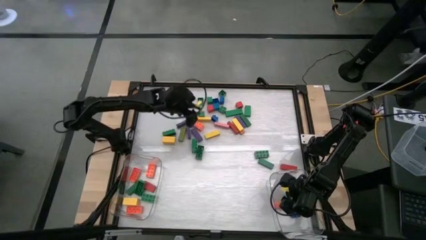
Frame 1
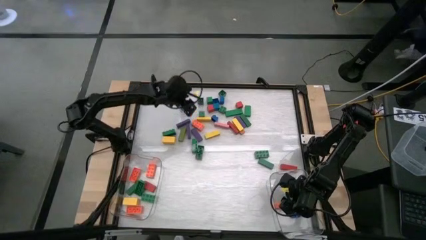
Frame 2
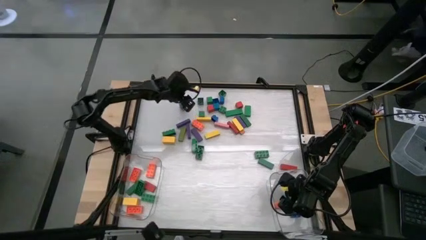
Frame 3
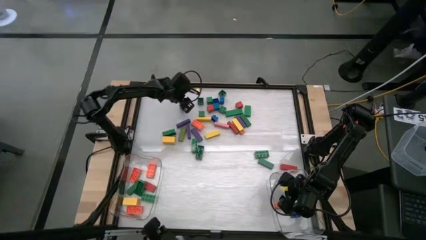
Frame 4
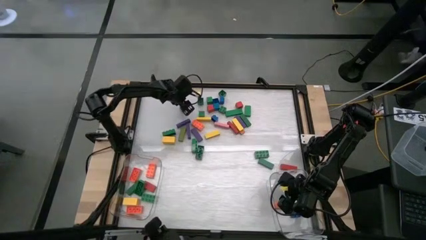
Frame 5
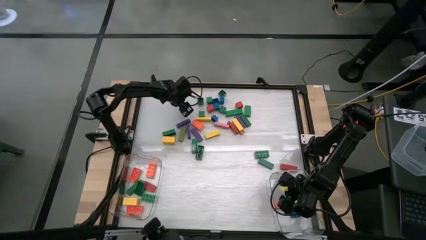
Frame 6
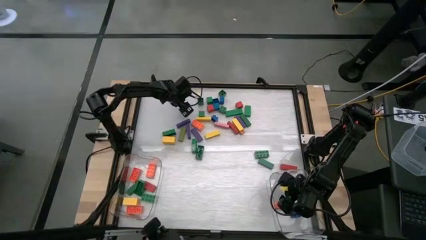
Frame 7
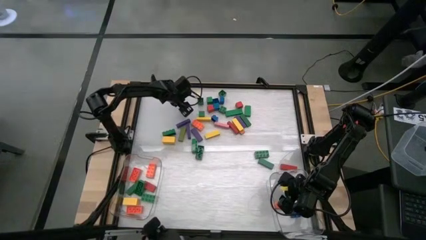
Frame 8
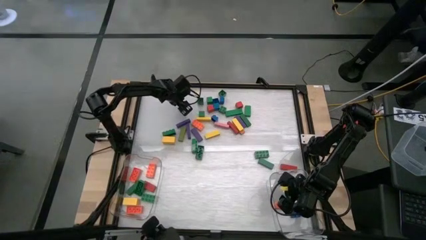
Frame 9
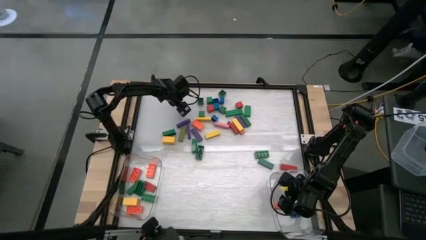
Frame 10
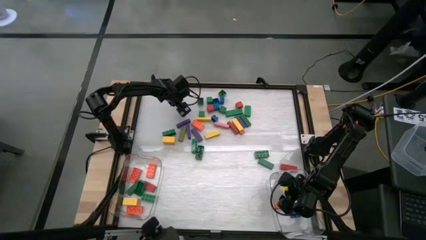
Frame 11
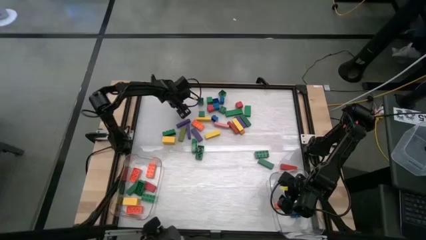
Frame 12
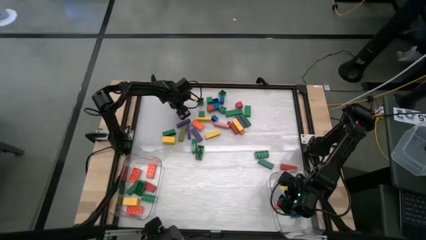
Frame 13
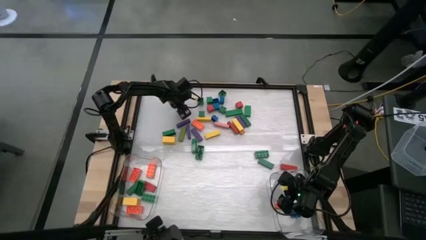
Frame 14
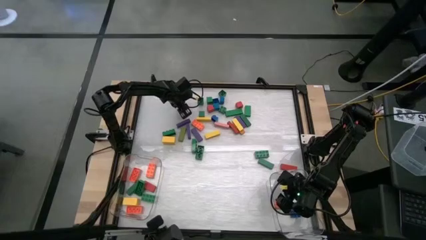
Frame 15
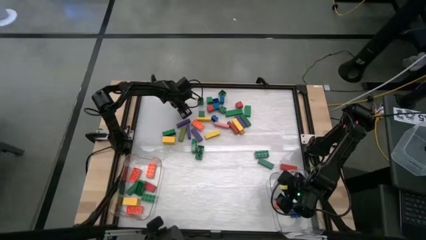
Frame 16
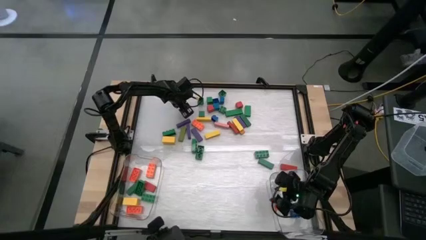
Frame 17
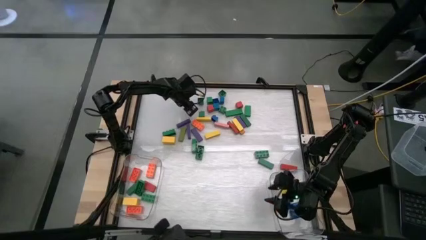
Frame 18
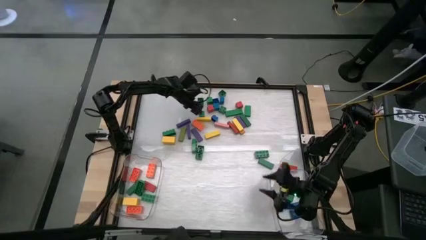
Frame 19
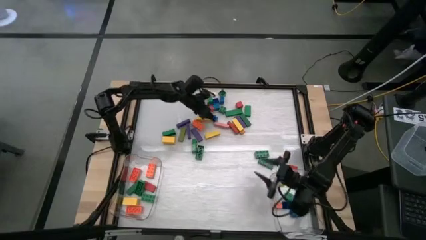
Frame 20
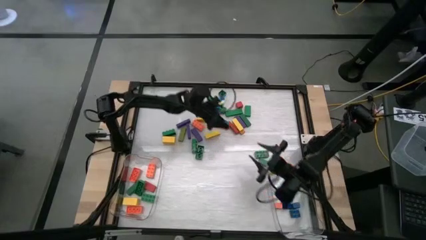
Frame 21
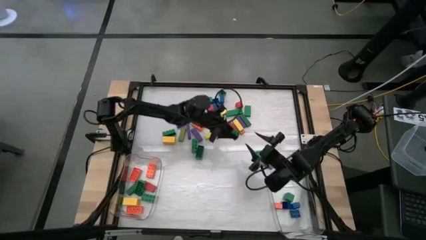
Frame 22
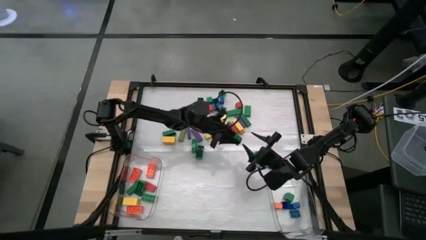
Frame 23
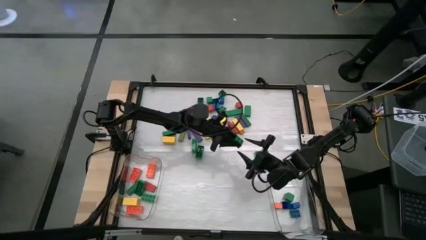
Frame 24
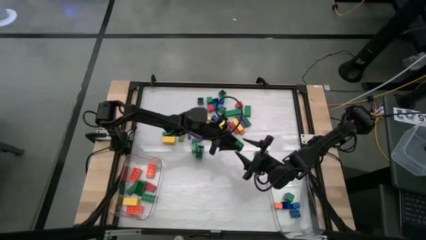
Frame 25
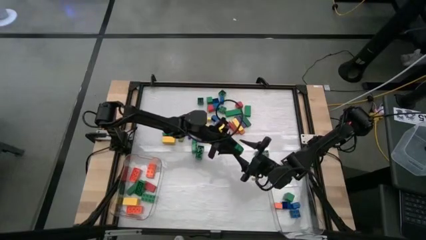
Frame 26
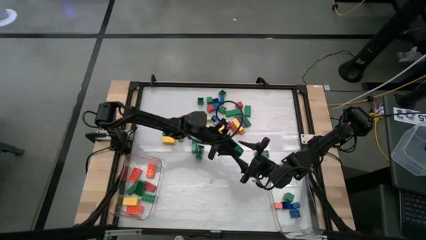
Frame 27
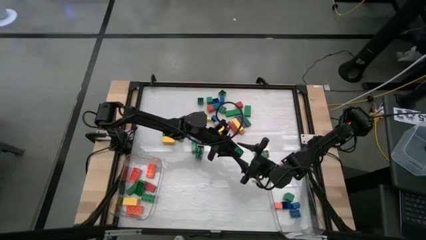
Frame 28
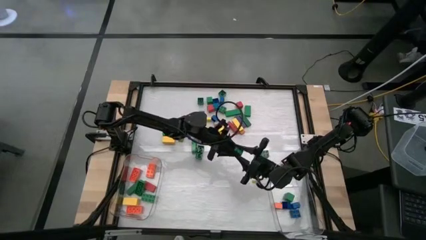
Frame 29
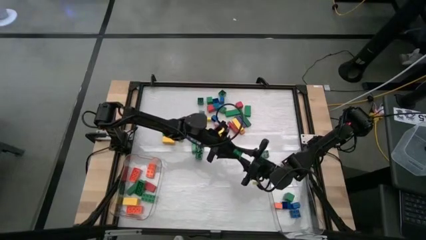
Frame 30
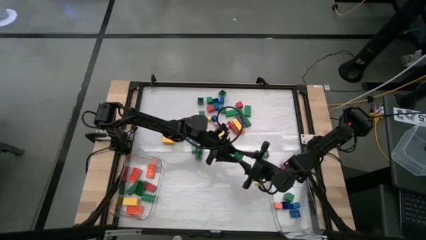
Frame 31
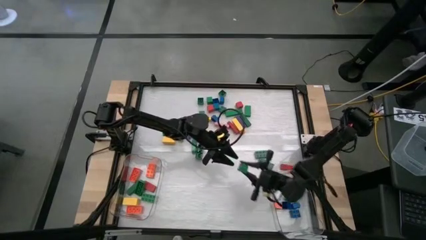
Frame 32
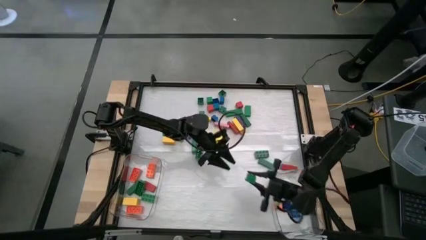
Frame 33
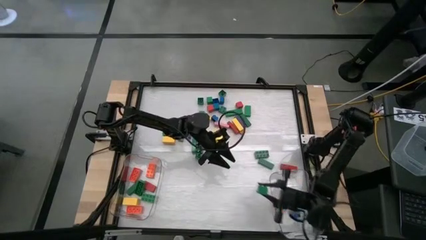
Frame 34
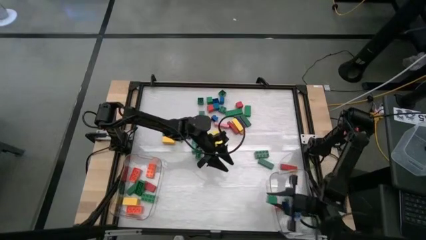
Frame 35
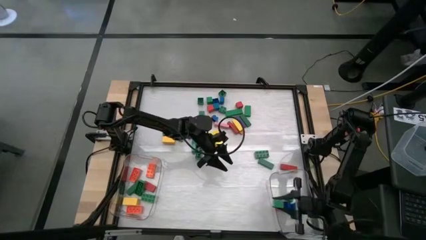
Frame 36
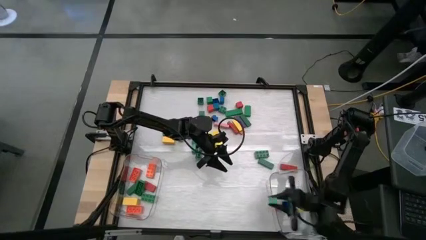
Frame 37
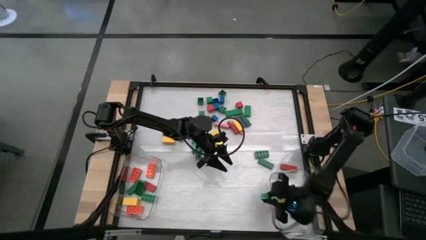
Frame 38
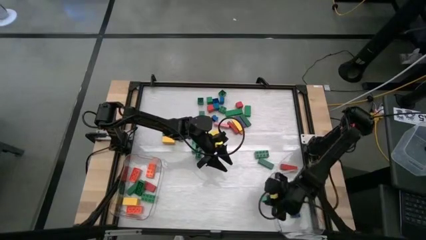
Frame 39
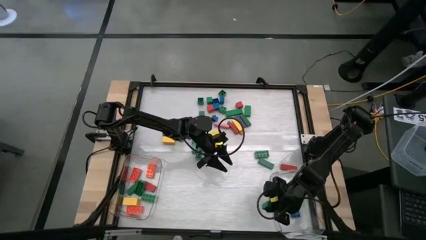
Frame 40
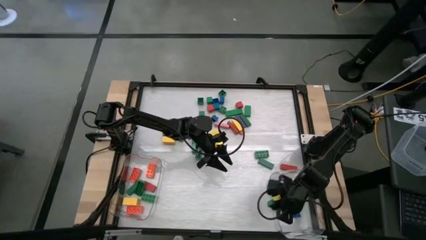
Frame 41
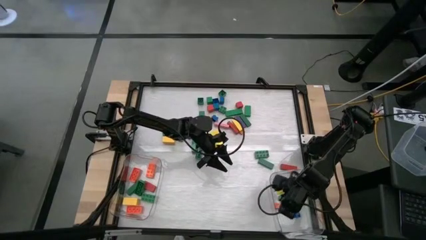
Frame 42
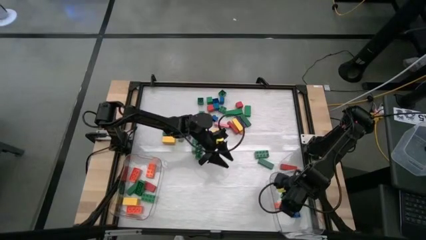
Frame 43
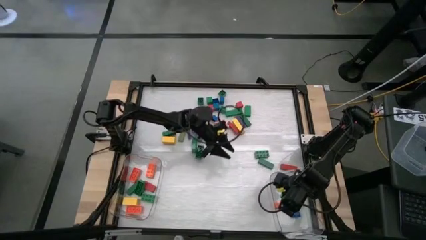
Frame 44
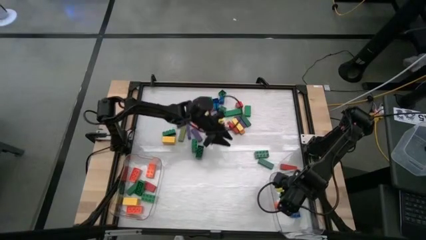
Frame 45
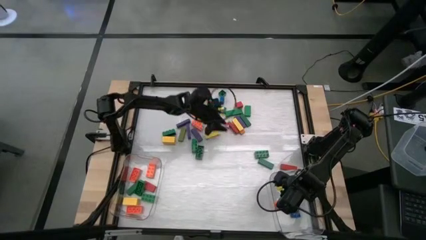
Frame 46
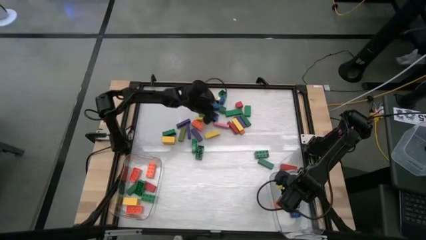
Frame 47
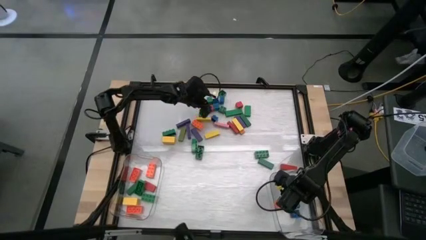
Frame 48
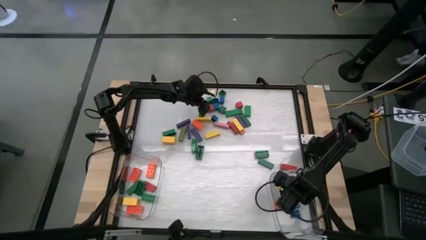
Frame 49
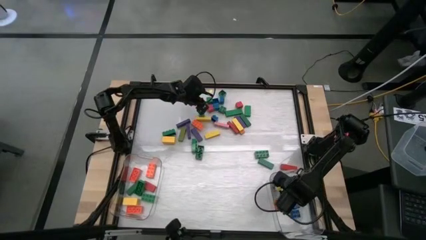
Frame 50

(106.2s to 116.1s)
Task: Sort blocks by size
Put the small green game piece into the right transparent bin

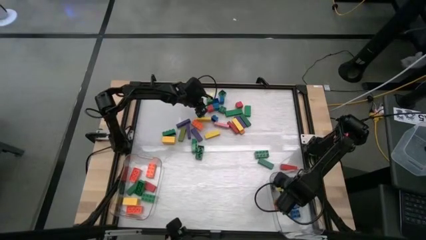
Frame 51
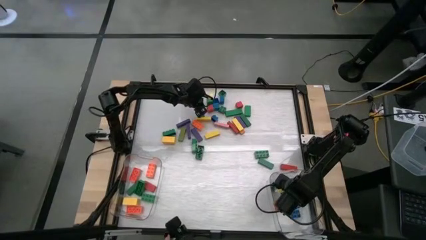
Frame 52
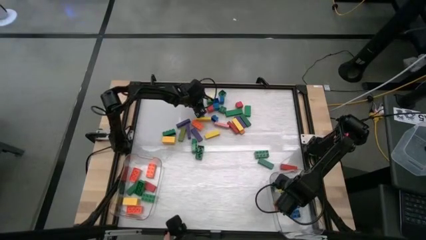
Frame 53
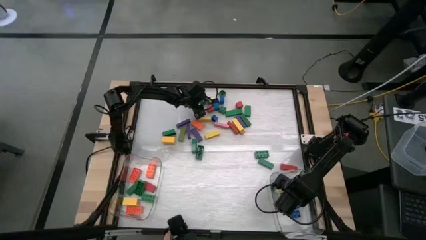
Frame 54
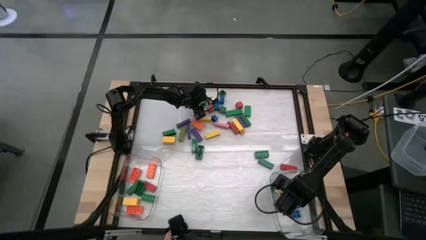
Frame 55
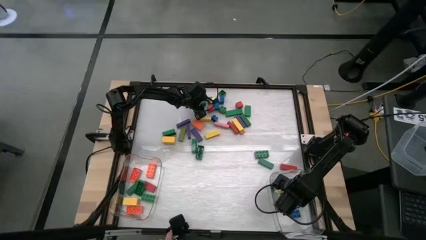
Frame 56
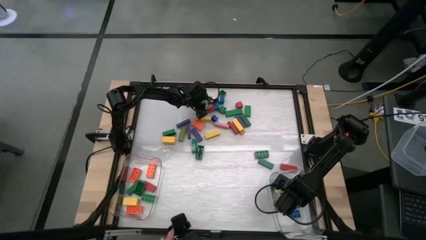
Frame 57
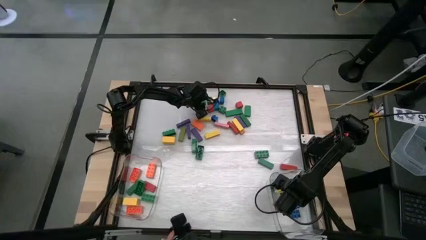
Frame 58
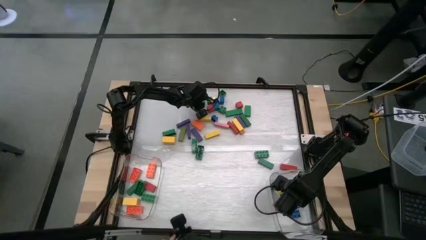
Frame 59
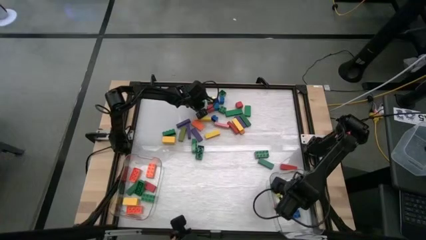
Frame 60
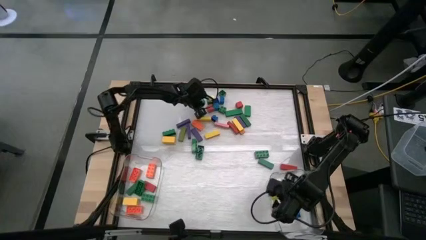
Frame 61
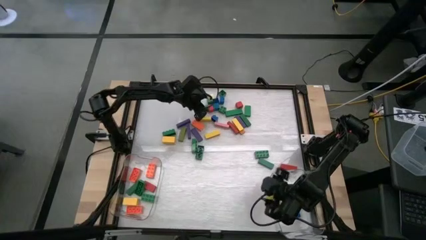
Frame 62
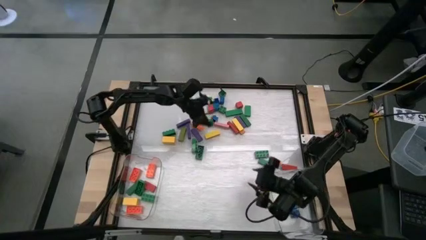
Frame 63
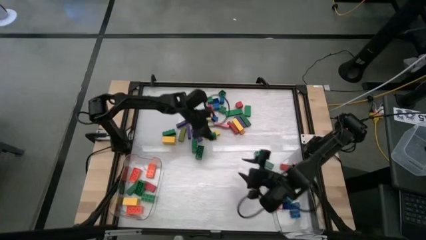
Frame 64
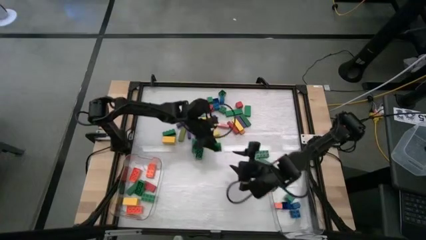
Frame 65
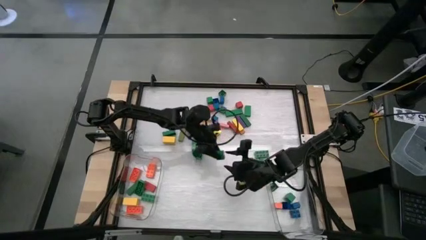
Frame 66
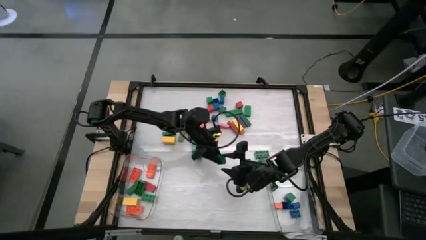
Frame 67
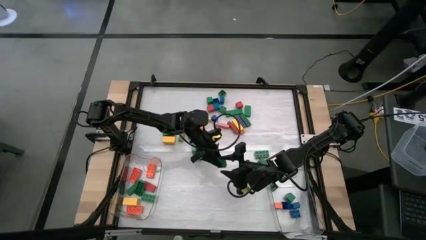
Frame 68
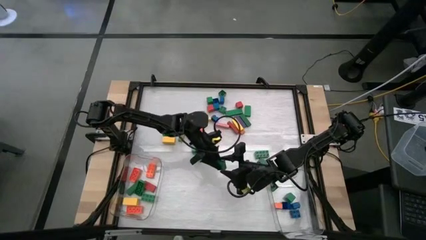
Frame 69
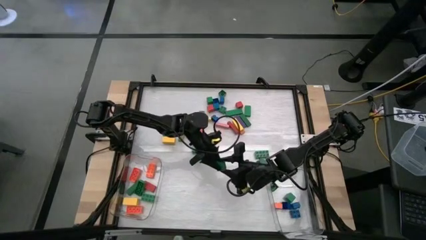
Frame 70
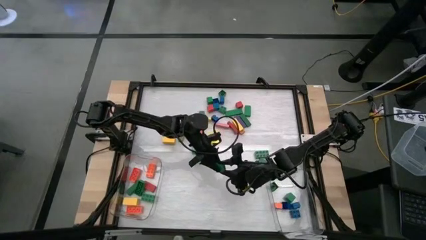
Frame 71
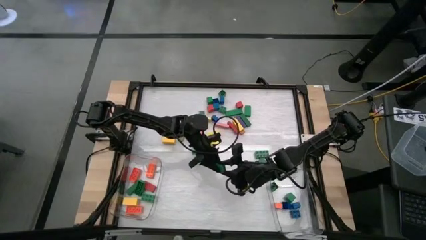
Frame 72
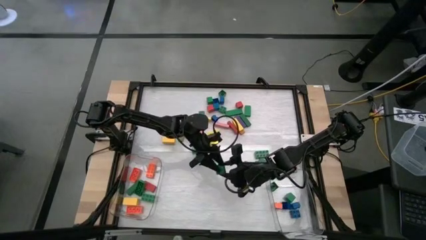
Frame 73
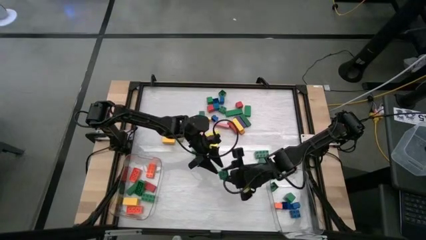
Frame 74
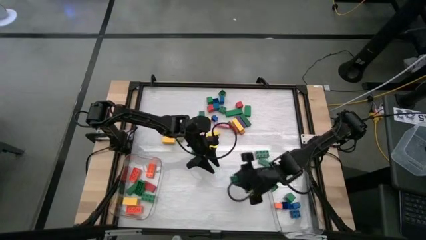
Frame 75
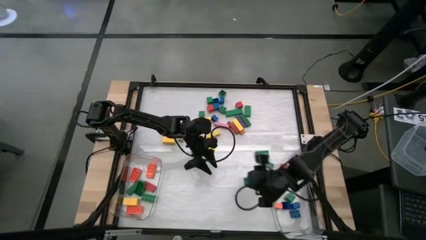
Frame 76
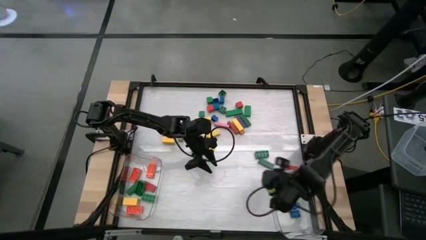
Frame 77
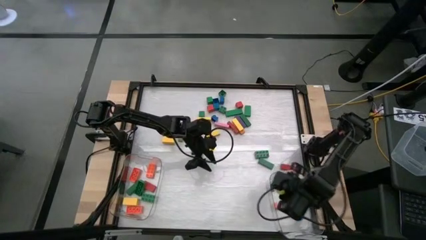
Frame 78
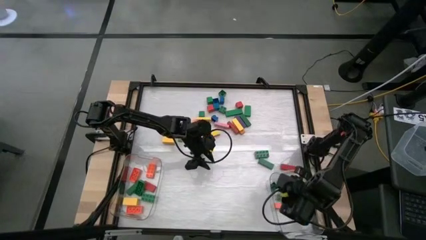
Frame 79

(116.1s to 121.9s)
Put the small green game piece into the right transparent bin
